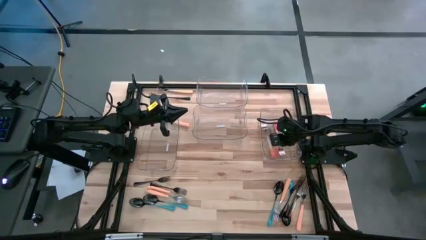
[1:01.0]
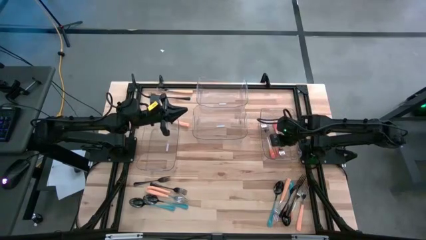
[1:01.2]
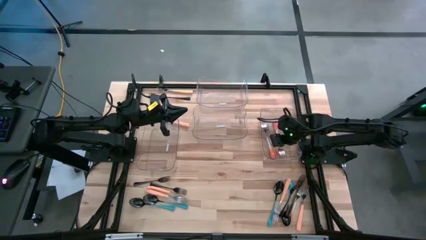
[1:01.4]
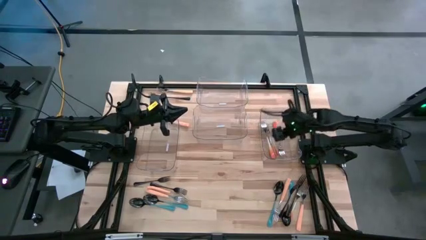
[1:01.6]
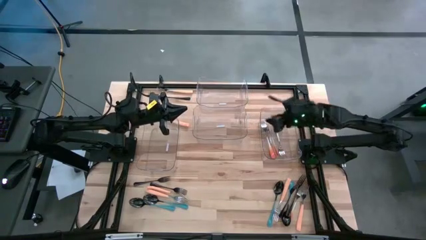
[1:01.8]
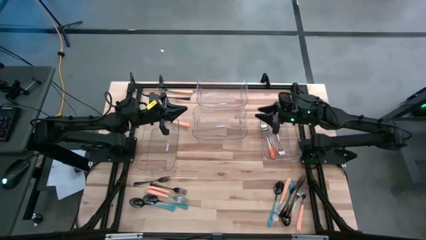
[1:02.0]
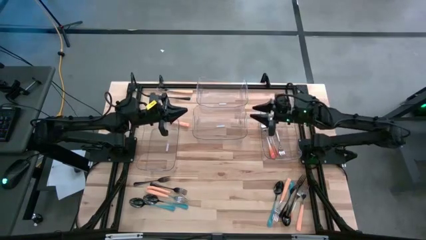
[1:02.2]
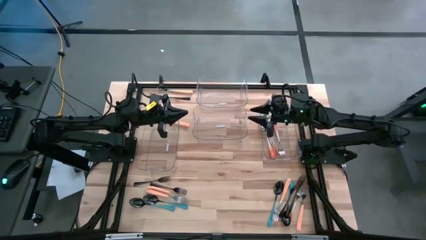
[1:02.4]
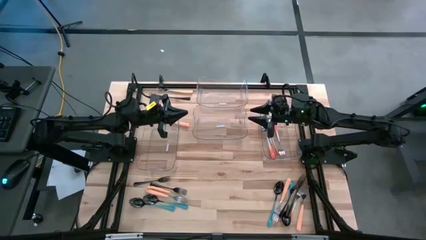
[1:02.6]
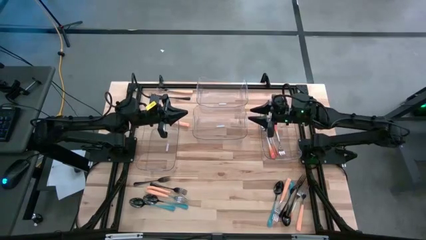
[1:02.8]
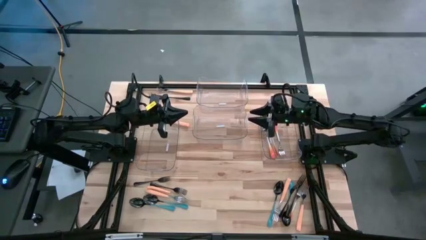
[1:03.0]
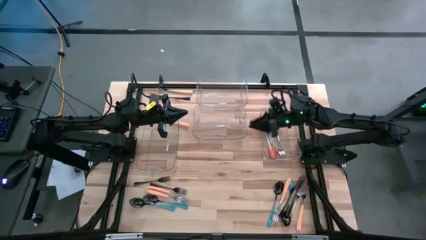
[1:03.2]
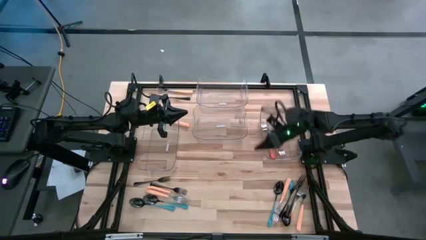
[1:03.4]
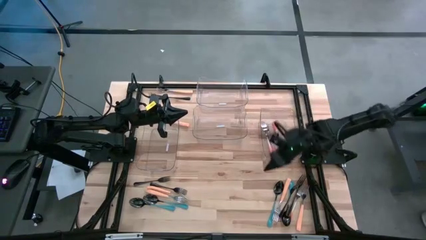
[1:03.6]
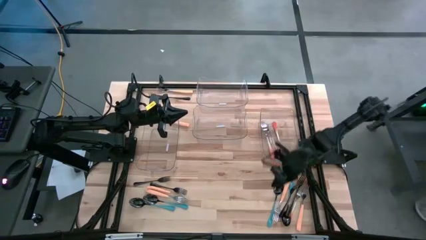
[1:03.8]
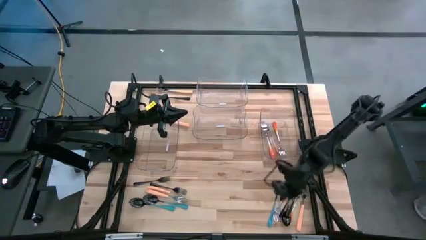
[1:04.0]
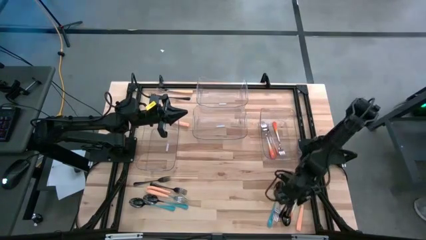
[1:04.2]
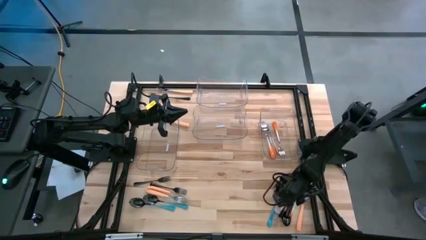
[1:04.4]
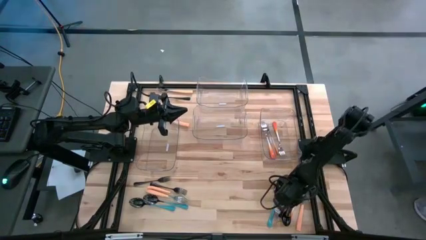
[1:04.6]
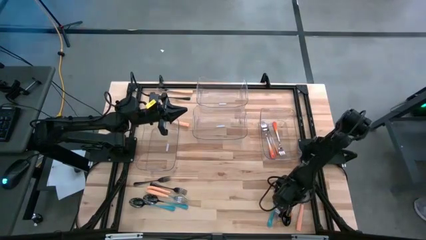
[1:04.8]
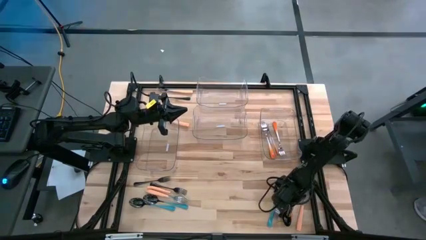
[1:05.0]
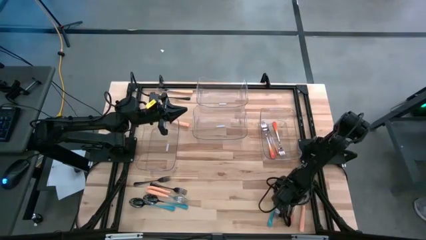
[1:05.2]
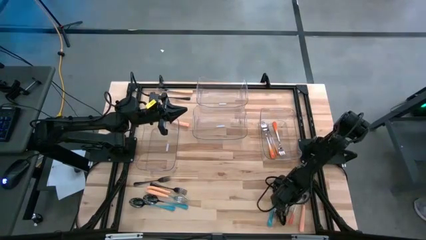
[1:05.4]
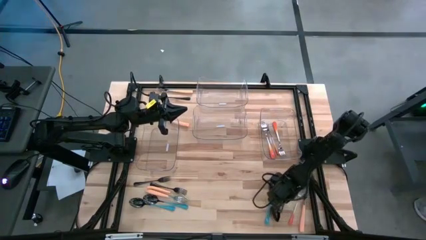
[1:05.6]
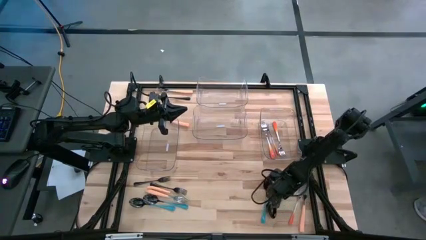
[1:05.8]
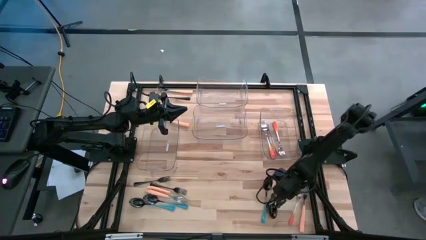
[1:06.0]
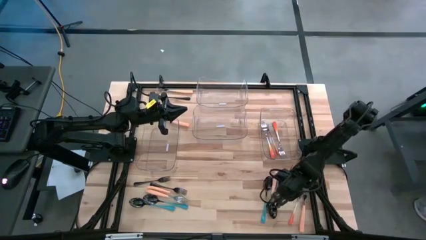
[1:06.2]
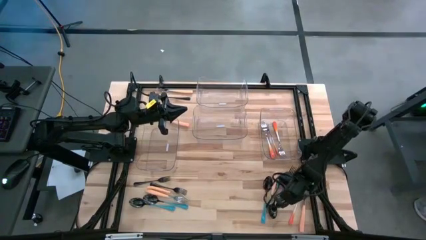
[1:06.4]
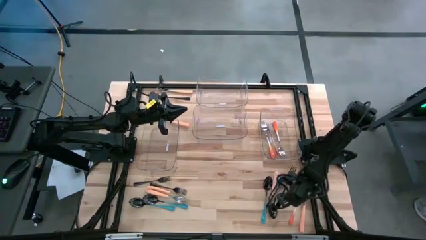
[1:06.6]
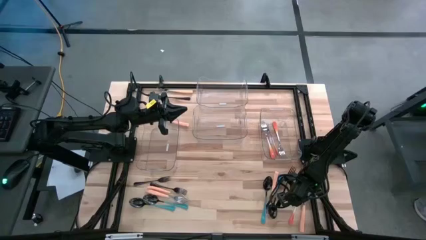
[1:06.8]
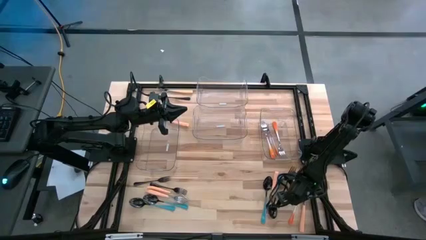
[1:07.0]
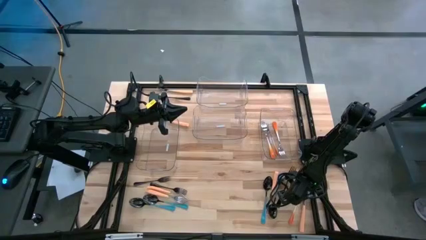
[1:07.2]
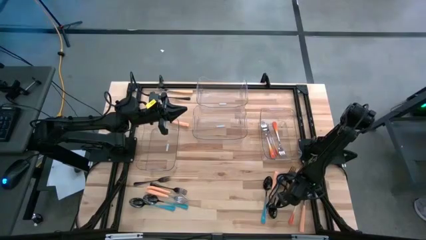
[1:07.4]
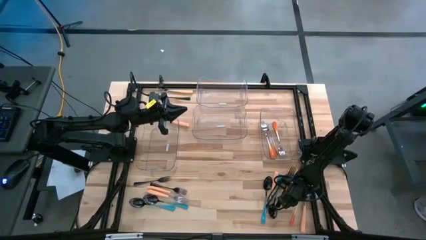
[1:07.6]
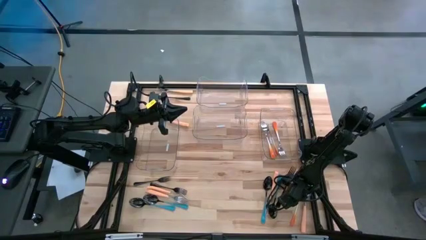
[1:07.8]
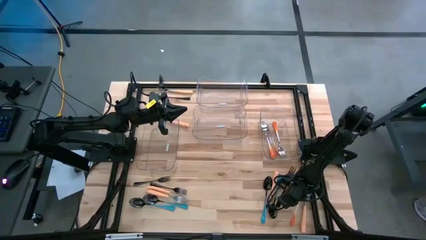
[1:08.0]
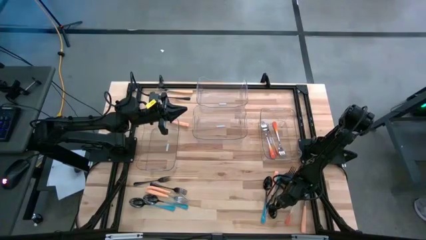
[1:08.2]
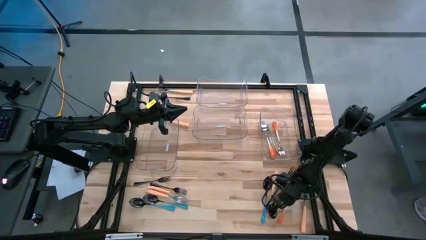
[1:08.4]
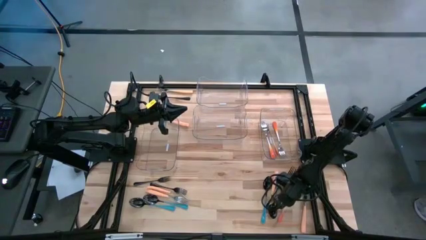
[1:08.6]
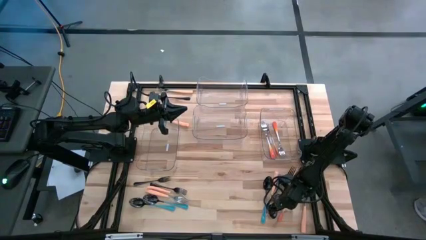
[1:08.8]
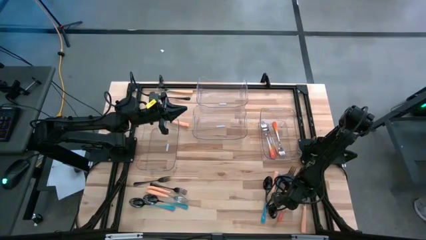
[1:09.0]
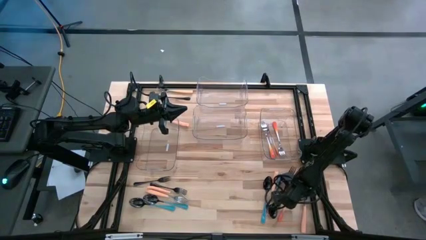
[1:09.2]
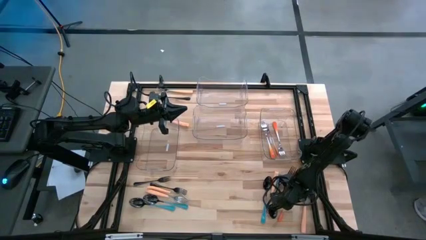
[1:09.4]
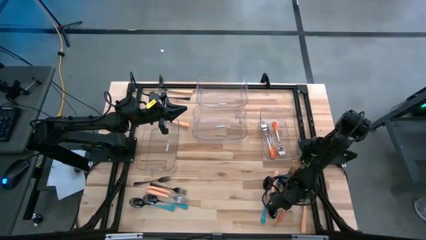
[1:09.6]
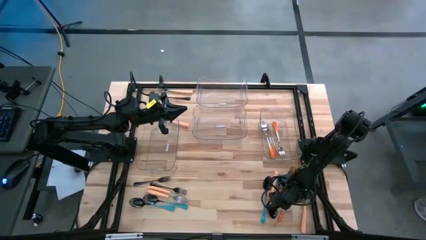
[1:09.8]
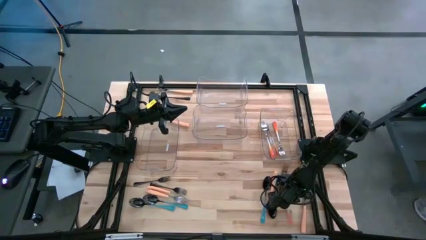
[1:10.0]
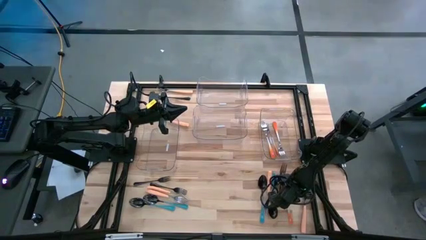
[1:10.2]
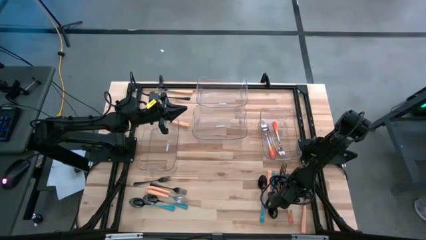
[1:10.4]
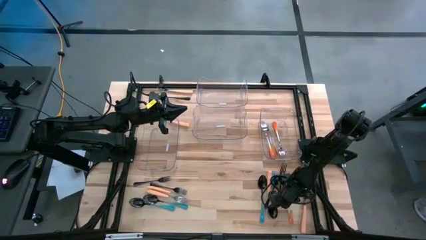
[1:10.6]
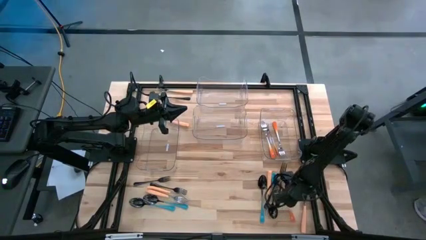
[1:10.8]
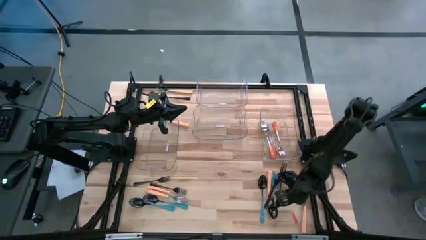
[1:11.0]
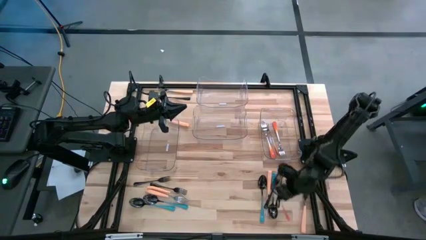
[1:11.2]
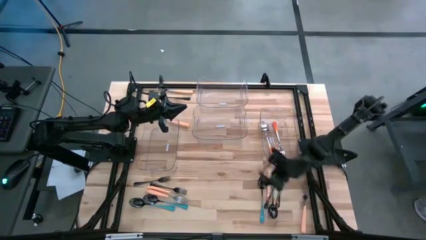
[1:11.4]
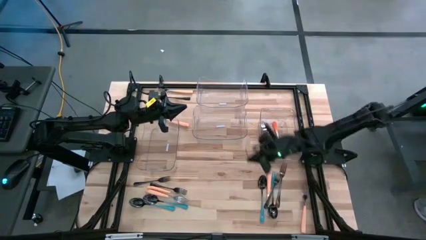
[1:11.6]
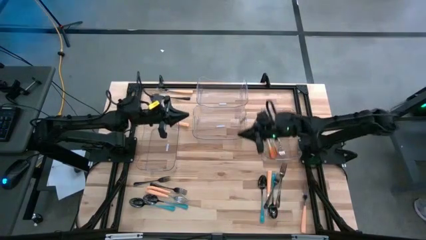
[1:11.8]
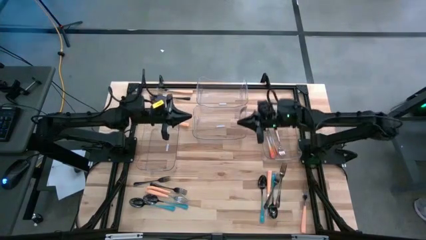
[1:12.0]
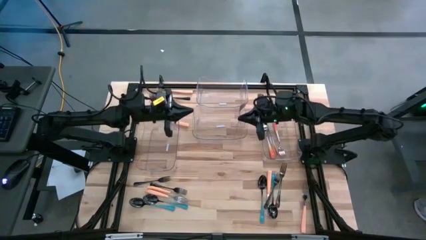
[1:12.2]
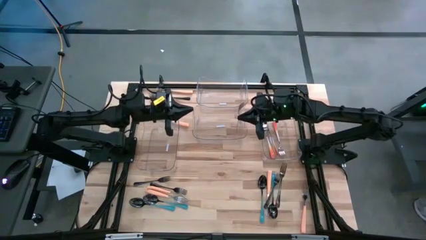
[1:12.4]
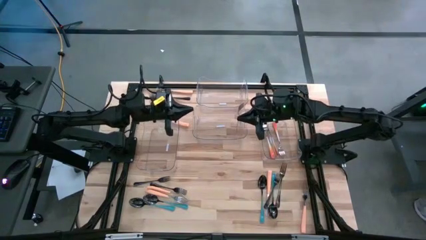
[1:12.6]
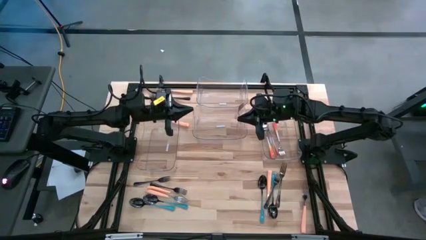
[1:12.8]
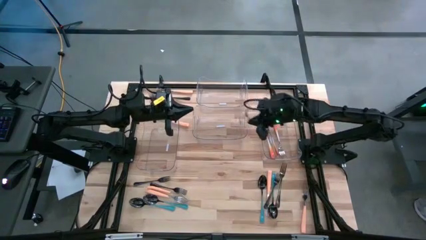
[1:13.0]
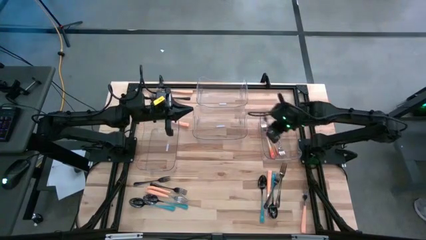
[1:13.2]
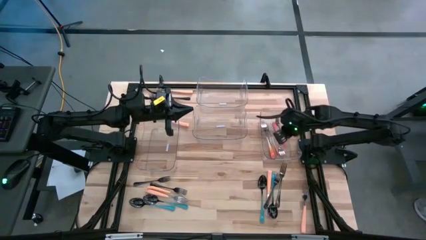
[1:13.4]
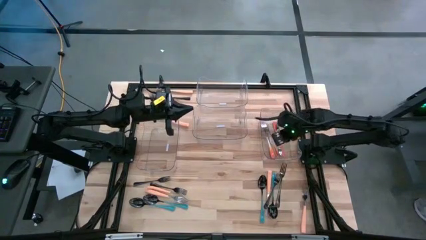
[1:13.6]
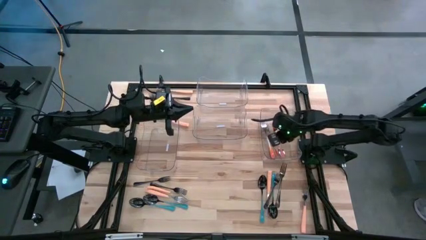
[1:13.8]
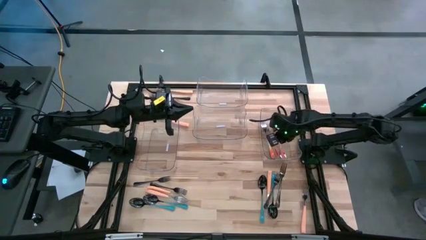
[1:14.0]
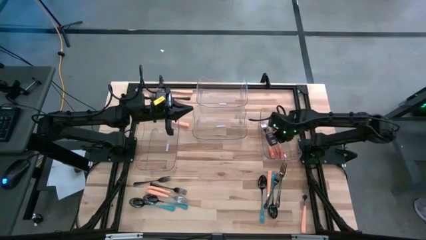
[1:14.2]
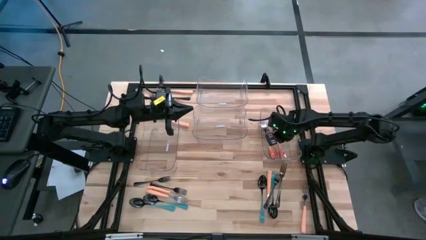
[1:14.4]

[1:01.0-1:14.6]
Task: Sort silverware by color (type)
Put the orange fork into the bottom right transparent bin
